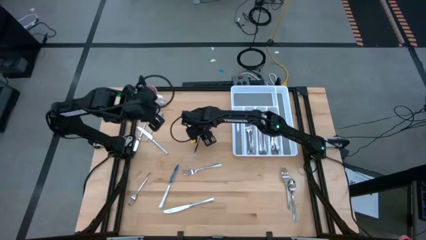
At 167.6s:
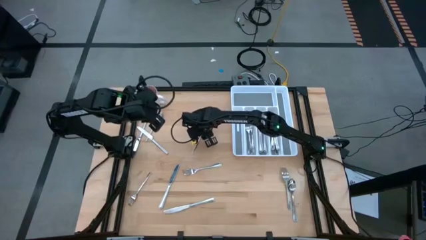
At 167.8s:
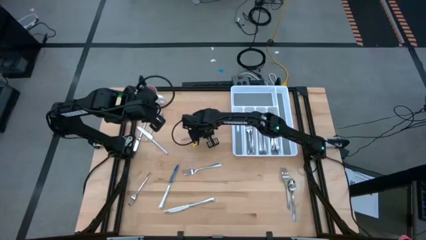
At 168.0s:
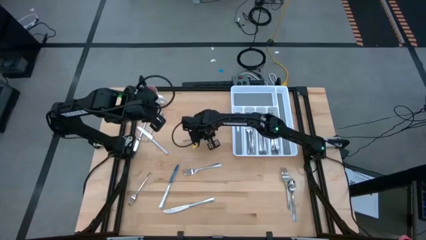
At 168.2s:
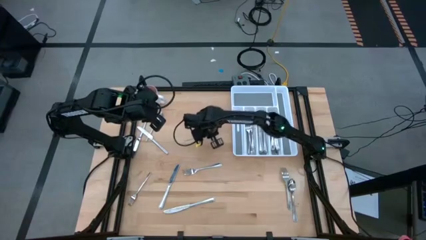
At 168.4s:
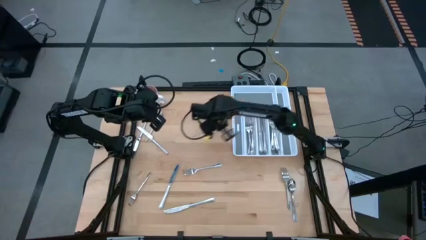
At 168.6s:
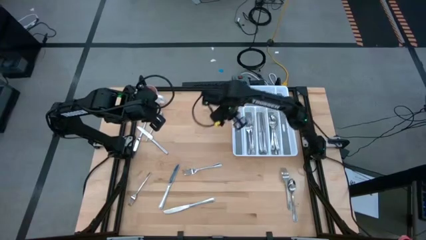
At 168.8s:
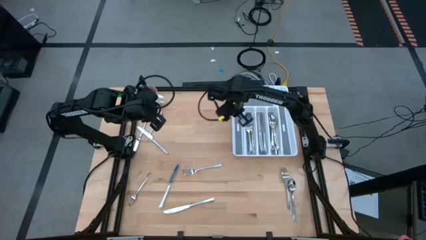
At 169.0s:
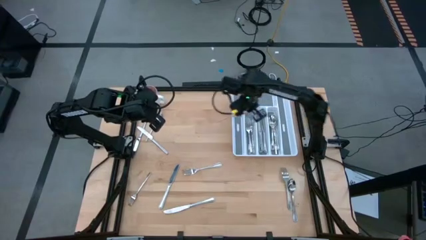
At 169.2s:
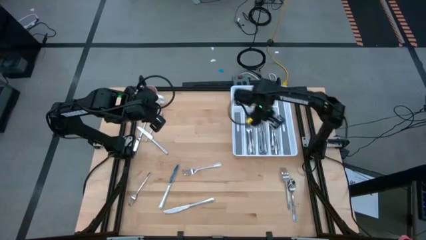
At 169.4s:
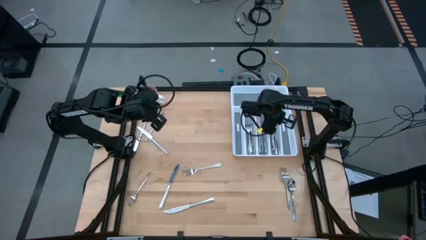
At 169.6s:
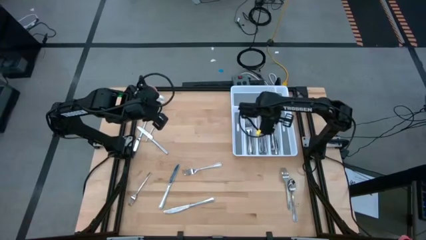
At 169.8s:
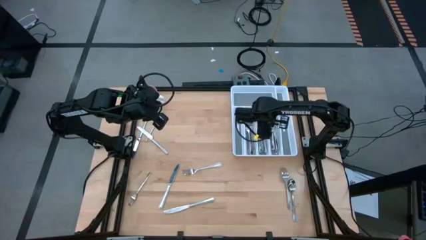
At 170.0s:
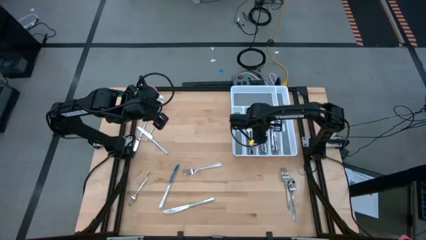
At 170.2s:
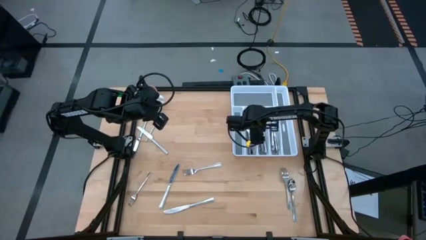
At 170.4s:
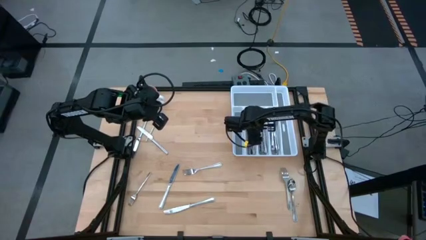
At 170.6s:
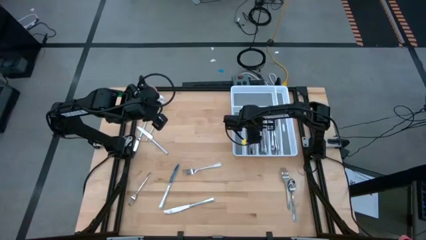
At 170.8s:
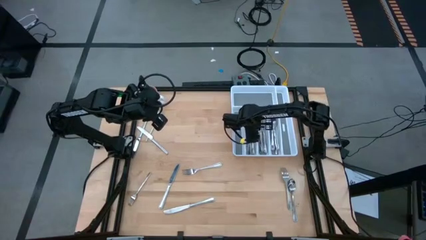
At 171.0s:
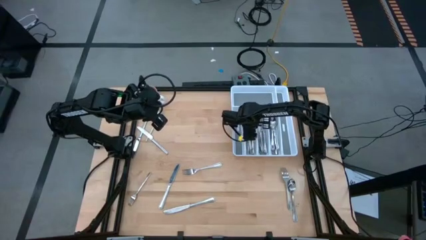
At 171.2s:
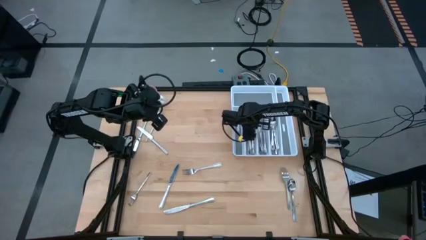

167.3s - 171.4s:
Task: Sort silverware
Put the silver fork into the silverware tray

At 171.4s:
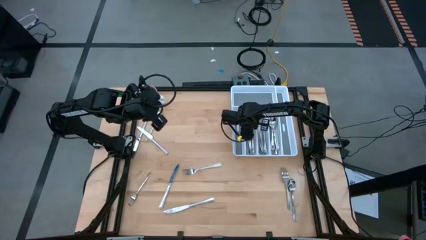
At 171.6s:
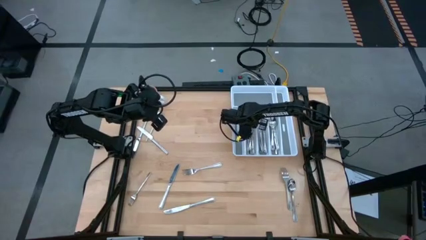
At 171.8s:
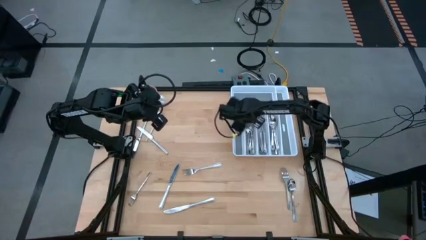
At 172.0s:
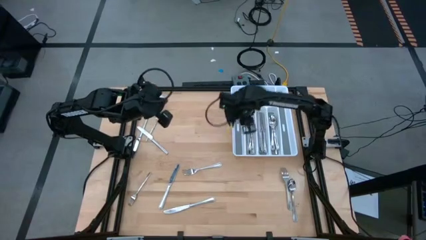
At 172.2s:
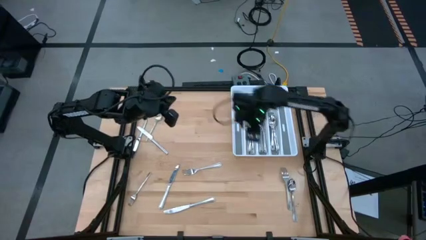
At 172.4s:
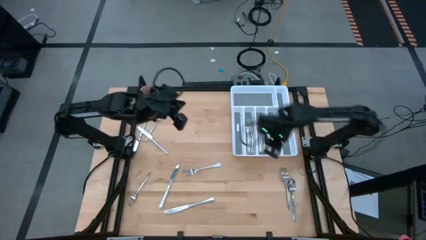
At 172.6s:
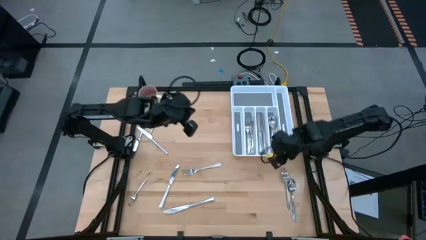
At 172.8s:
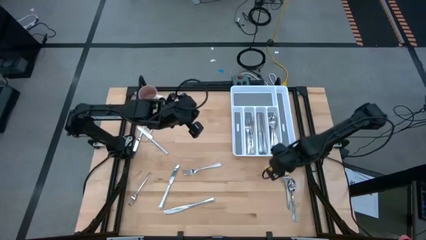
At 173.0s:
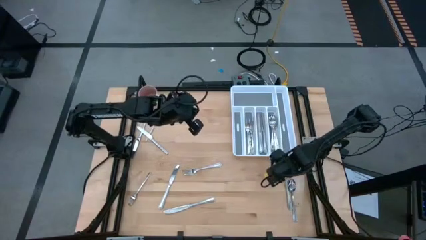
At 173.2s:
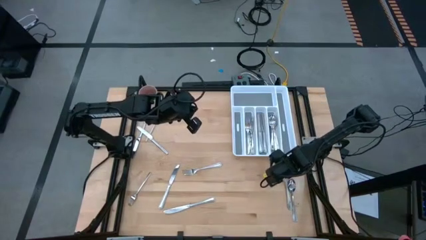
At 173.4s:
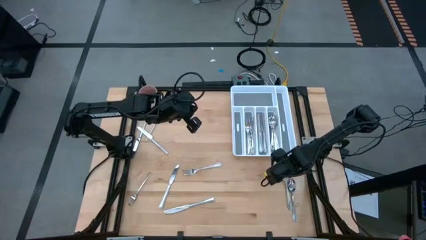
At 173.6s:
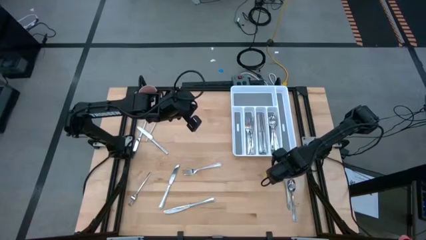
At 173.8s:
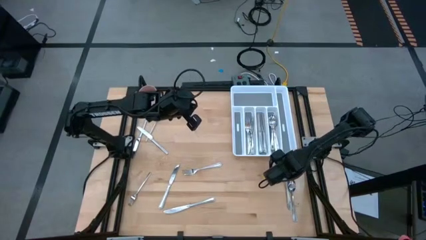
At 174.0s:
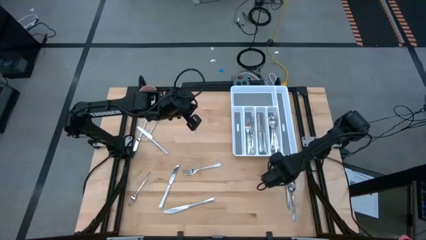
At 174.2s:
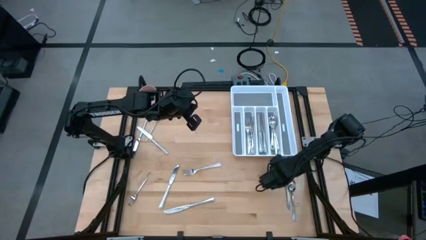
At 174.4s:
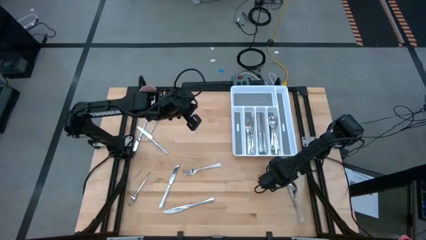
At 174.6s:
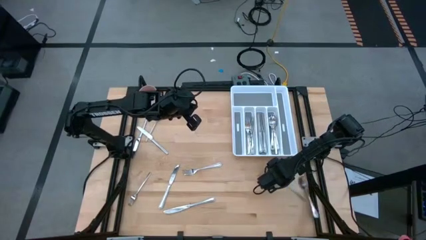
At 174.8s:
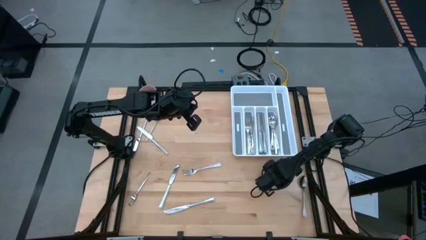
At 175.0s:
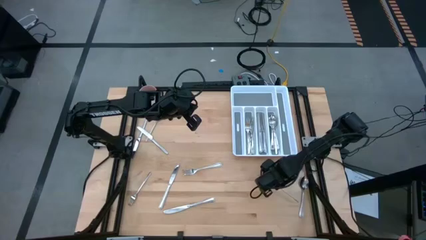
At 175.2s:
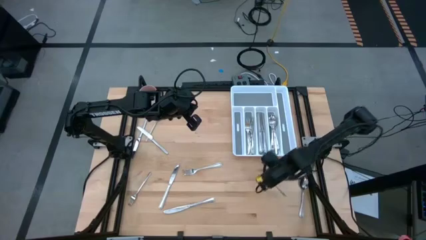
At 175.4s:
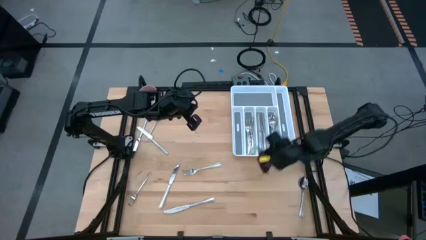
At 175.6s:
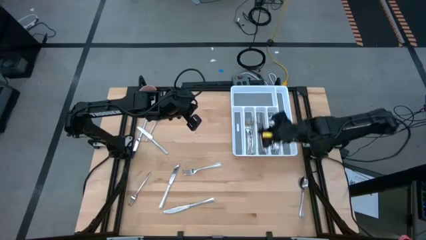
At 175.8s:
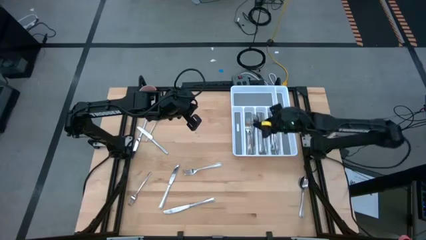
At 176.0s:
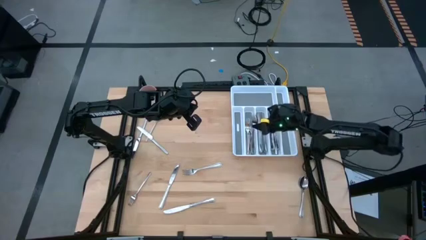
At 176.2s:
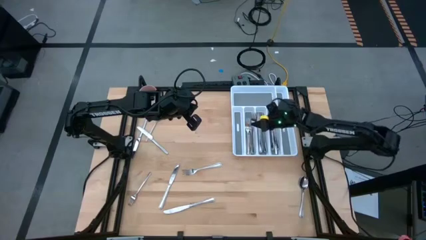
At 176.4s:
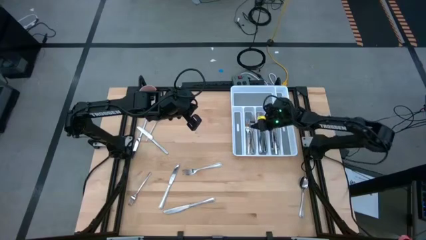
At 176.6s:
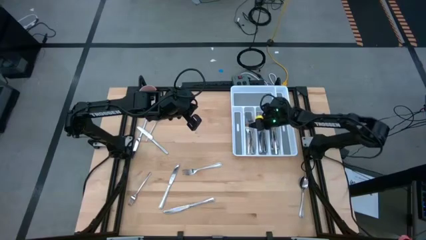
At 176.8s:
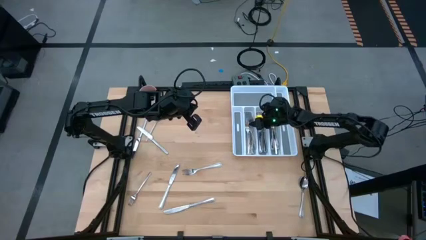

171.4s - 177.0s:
Put the silver fork into the silverware tray

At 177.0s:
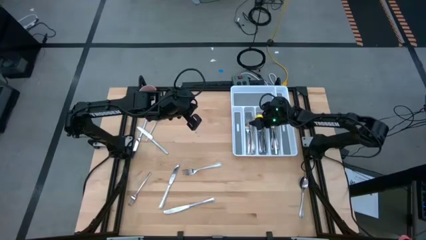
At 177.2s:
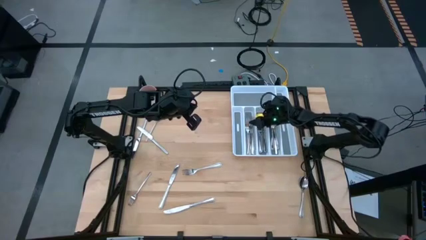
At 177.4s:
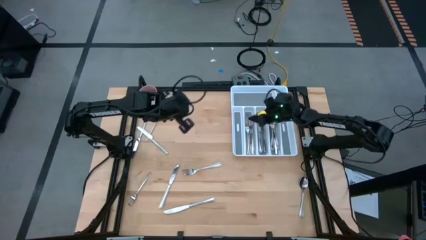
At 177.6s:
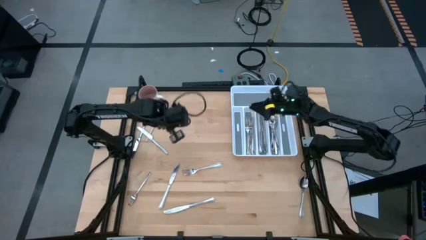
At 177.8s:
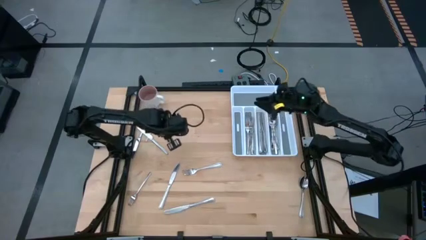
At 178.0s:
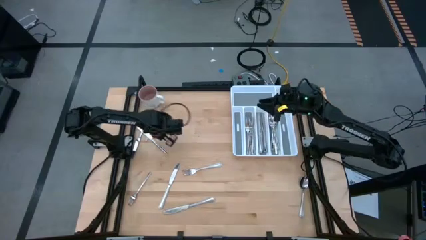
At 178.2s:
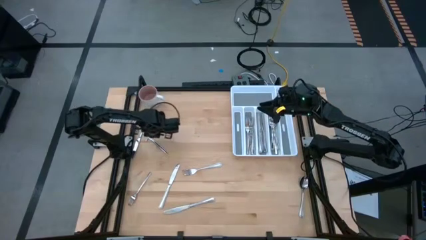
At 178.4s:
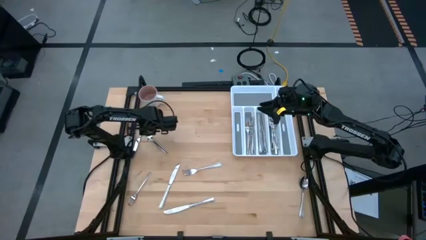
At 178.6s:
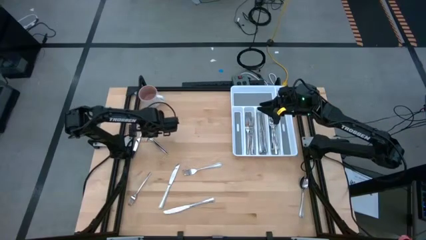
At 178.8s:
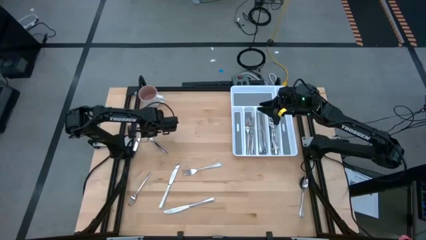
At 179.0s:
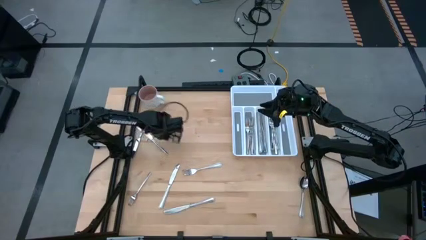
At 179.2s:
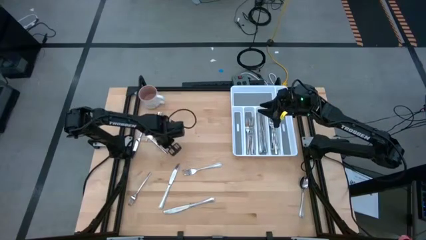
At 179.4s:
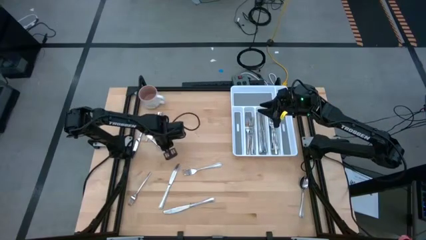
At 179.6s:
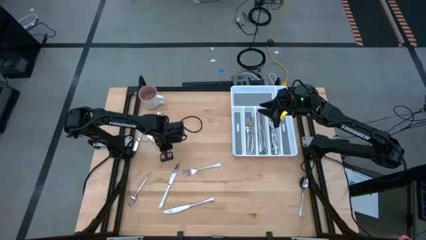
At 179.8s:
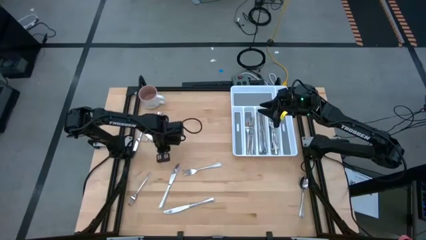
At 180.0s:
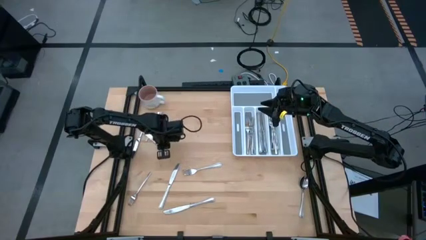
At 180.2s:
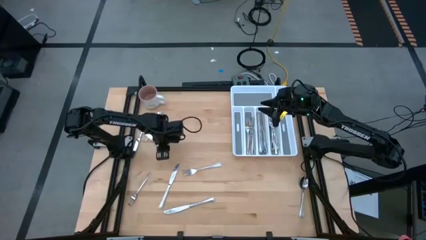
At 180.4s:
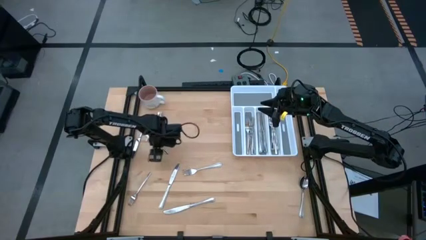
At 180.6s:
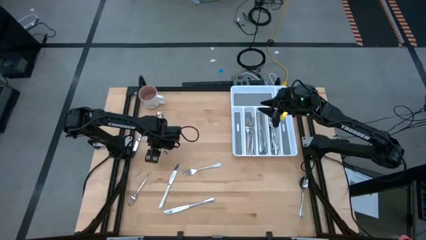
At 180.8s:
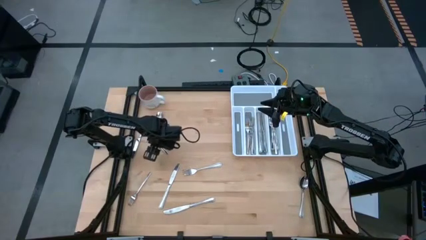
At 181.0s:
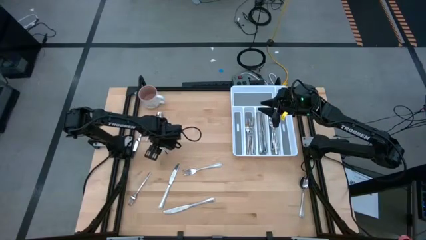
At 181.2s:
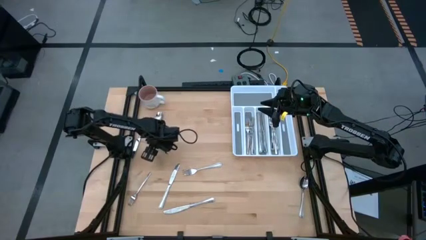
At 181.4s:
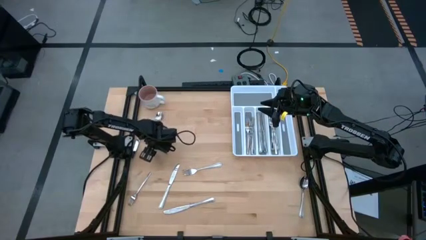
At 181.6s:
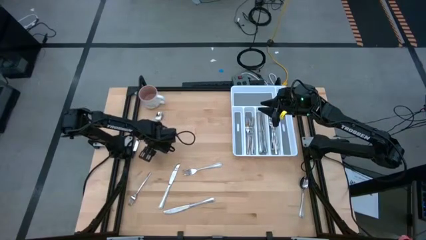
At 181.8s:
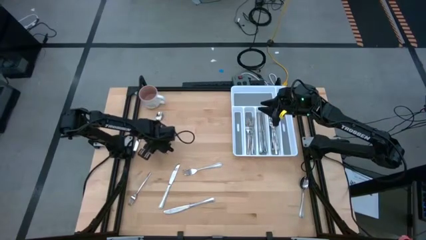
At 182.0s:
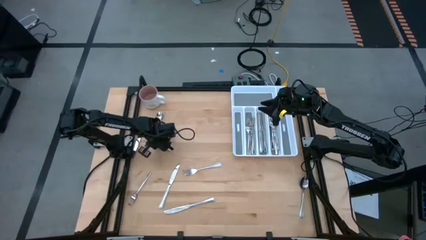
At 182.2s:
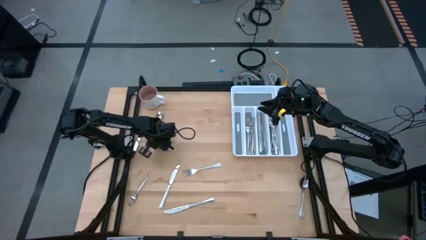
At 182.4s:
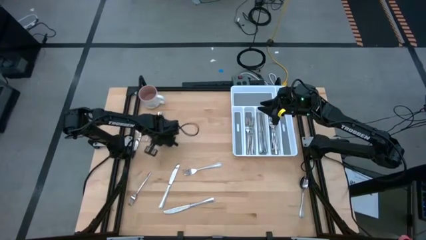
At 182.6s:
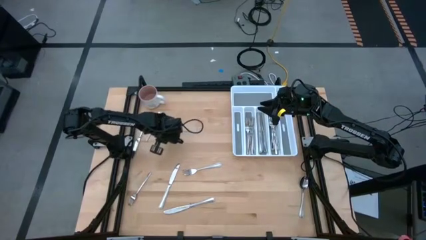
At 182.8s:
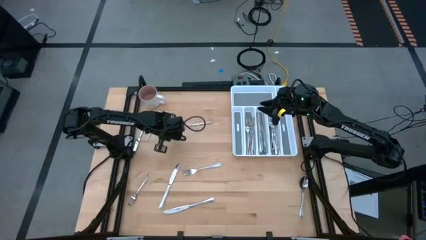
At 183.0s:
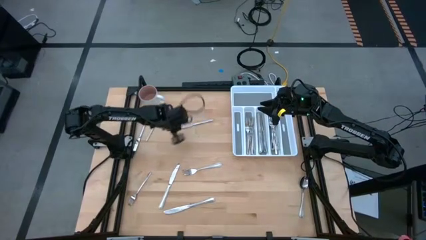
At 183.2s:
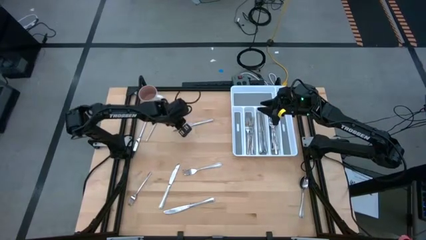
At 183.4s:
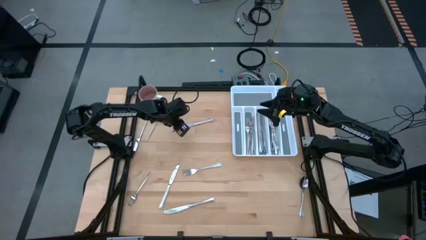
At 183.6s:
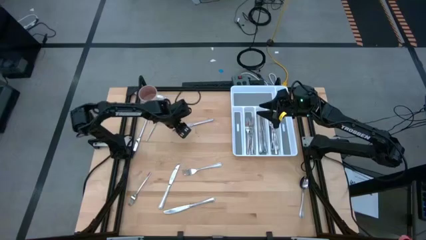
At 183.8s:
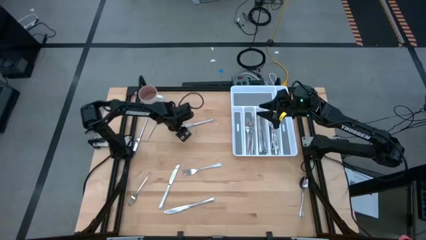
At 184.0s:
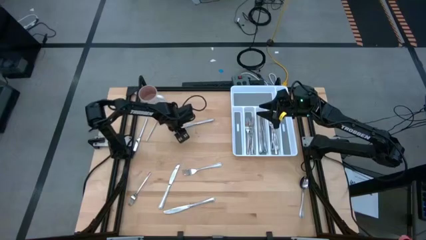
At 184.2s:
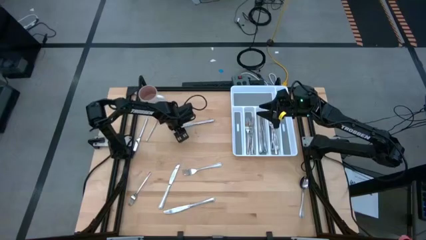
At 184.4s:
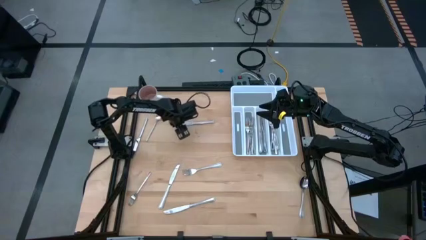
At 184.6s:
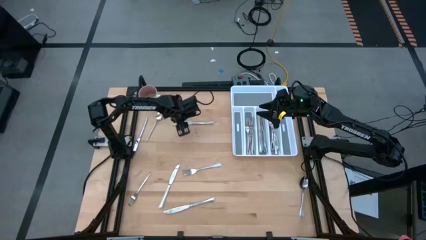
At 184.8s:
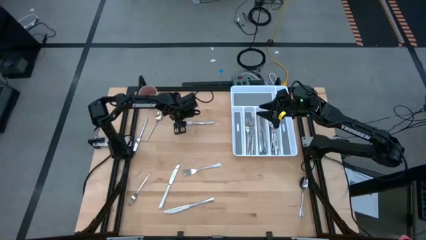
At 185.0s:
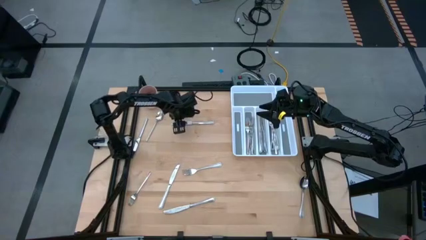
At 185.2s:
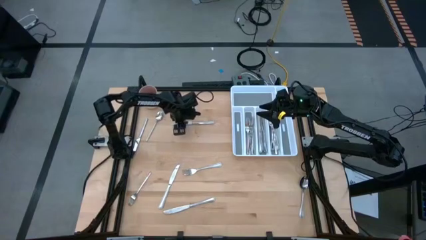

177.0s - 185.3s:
Put the silver table knife into the silverware tray
